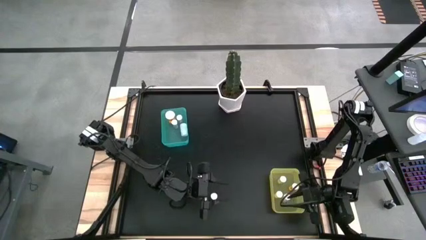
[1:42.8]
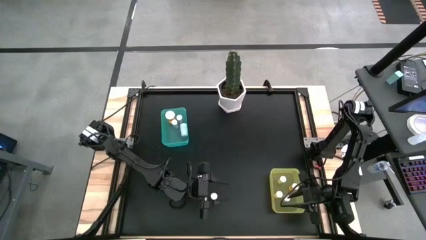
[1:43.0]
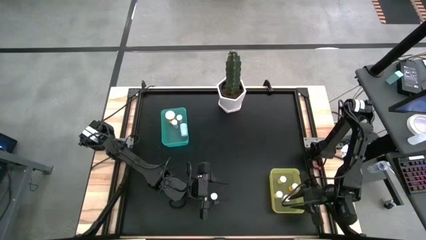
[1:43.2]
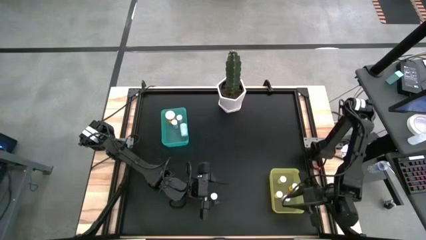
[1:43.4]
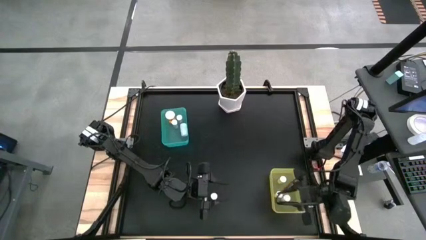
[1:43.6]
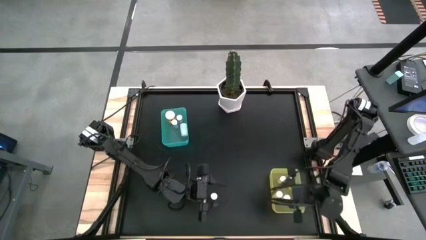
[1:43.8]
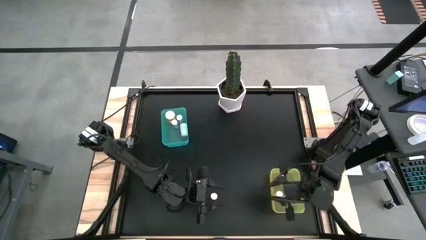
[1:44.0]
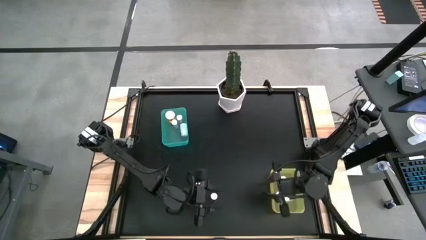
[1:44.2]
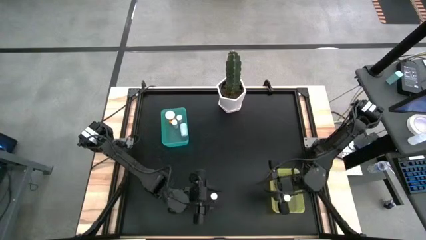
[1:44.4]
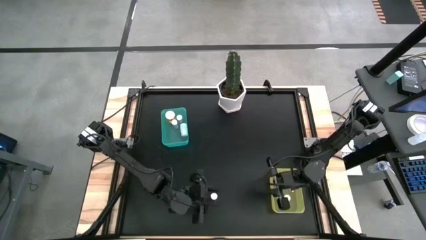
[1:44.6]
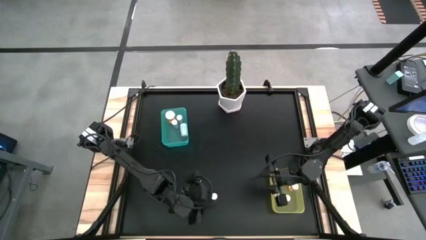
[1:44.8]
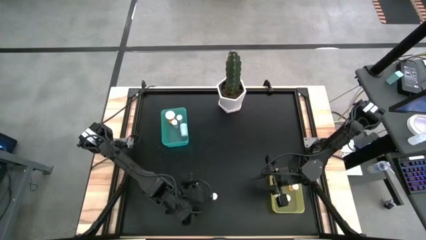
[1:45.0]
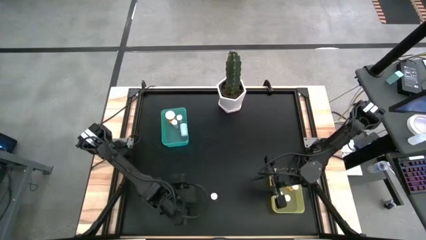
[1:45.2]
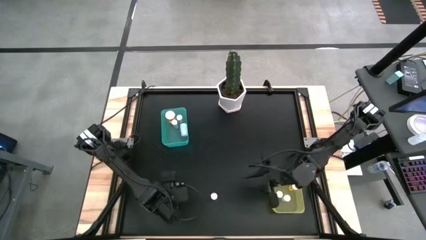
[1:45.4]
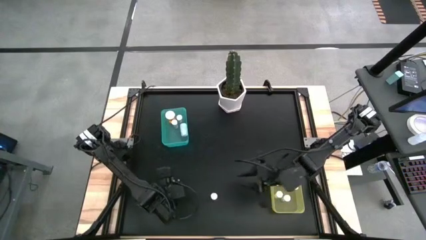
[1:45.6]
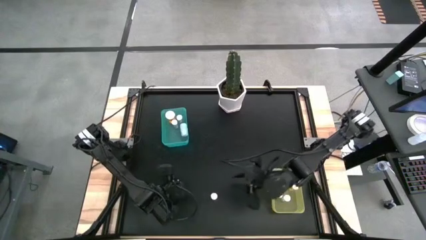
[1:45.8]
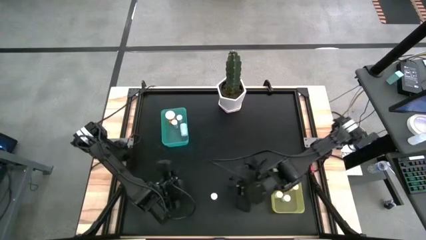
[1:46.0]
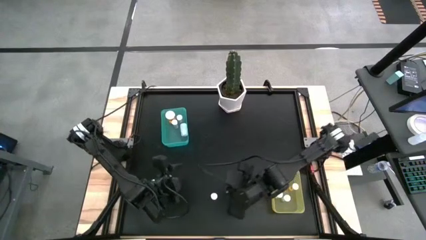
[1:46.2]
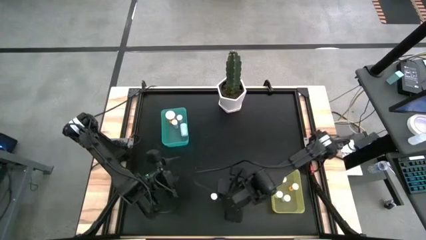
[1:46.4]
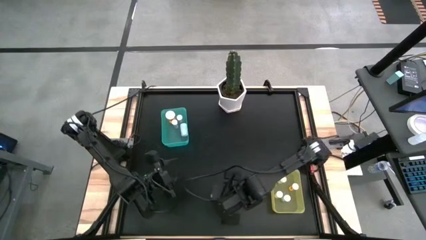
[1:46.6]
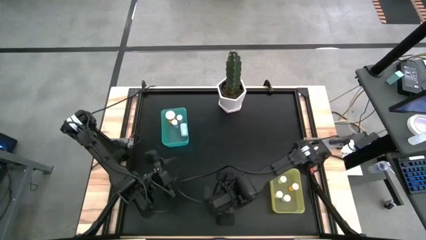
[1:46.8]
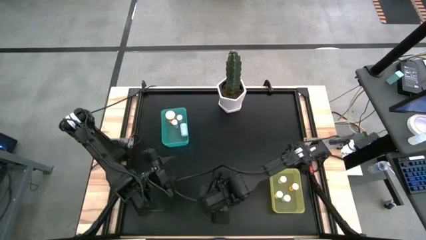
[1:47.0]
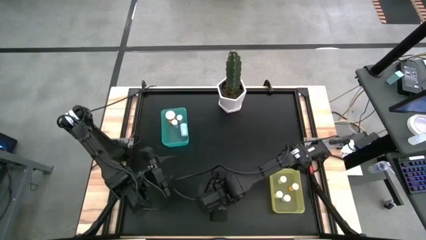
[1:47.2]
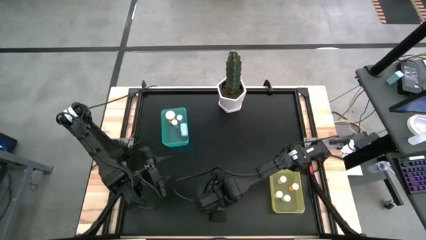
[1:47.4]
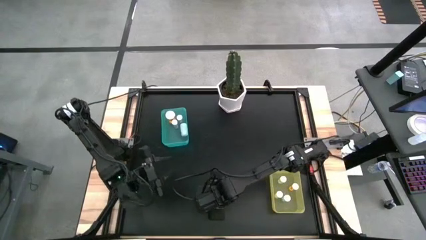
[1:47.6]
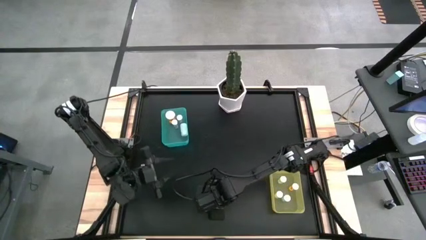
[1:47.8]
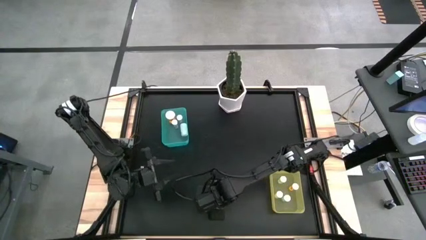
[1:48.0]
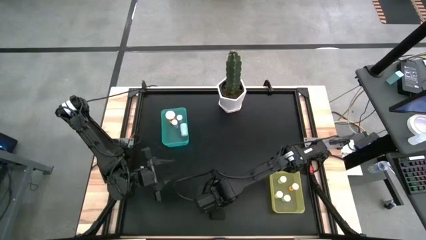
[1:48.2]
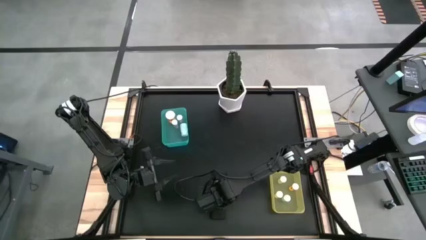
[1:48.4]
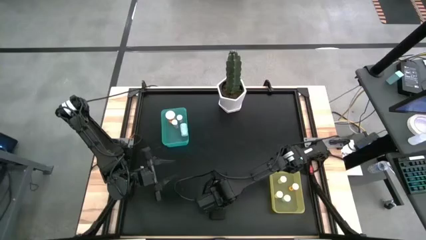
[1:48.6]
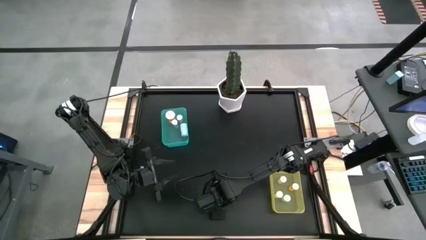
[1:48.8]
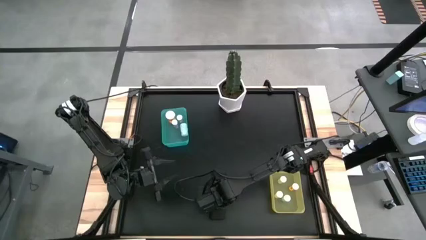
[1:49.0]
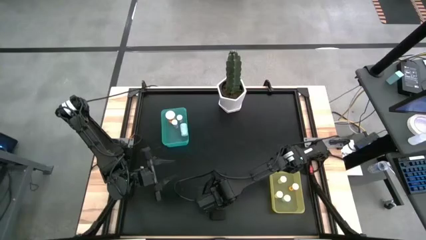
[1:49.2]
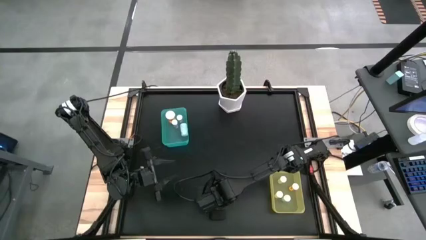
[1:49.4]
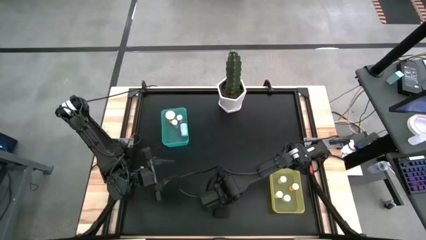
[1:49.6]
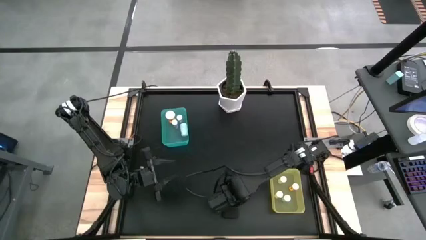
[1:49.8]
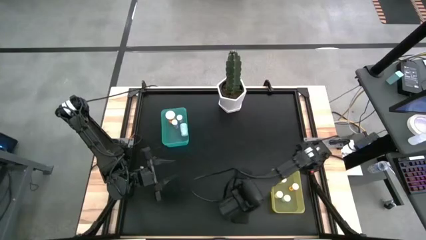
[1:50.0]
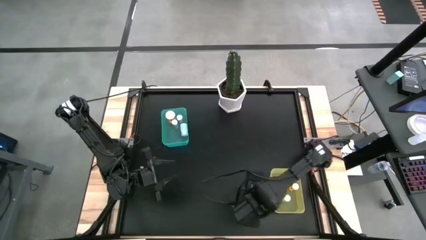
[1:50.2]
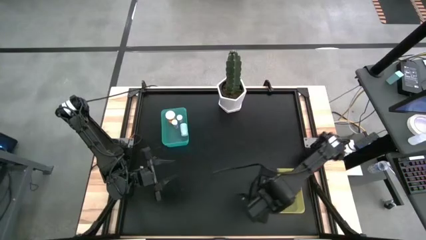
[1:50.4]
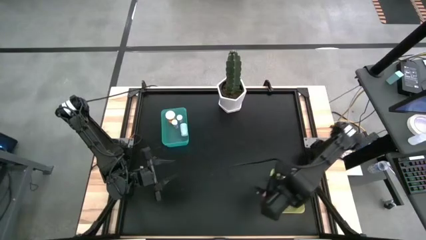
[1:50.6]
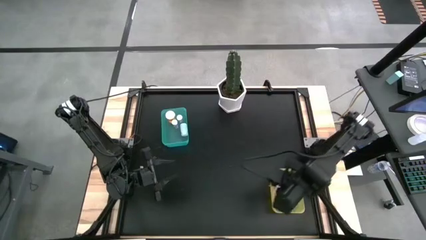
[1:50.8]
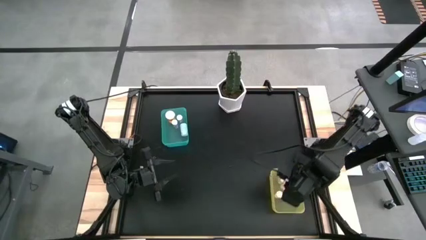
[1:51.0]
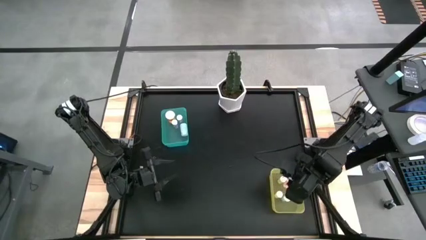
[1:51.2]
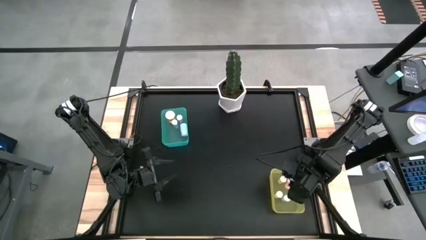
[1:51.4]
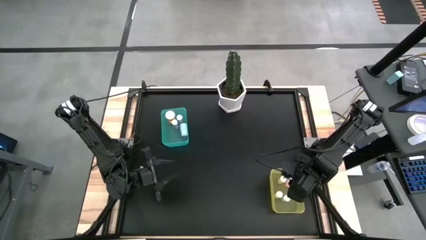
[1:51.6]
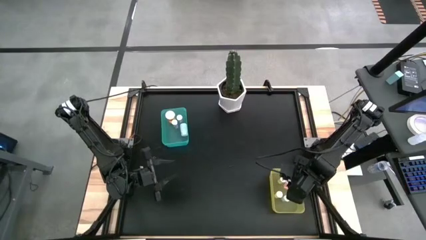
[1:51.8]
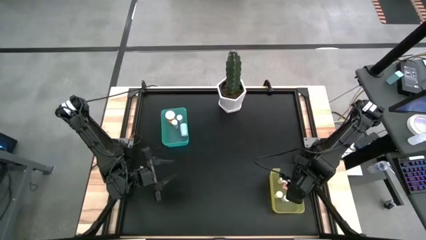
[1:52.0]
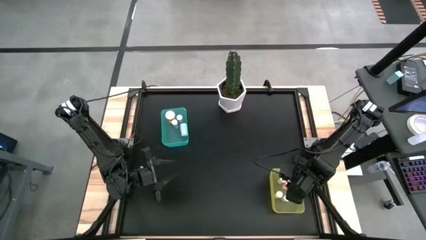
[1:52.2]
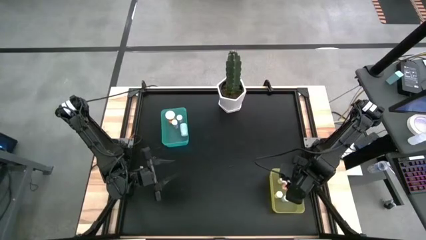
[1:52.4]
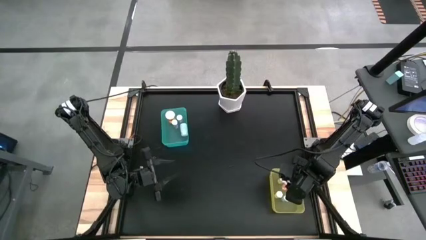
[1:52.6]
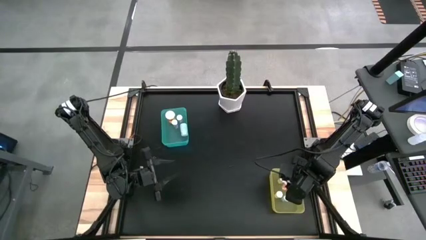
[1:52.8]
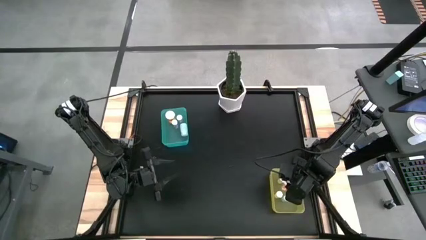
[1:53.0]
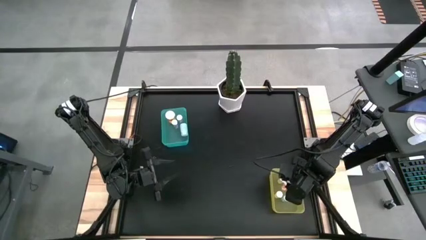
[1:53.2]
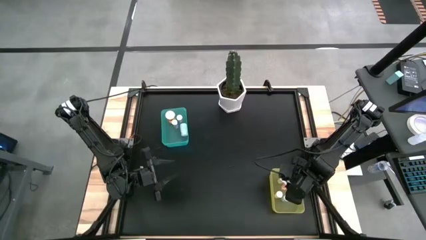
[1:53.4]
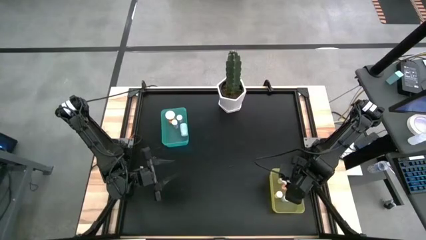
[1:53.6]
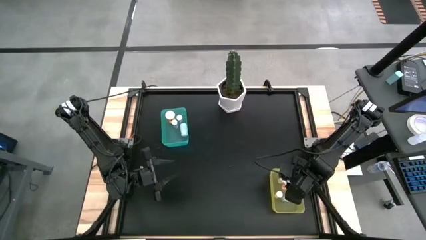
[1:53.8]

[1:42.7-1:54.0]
Task: Pick and place medicine bottles into bin by pill shape (circle, oval)
Put the pink tablet bottle into the yellow bin

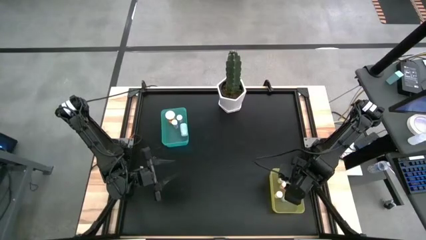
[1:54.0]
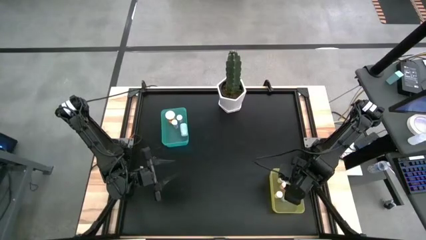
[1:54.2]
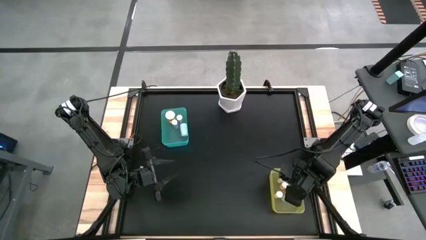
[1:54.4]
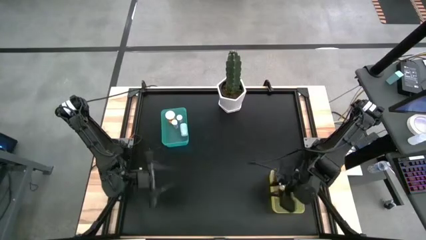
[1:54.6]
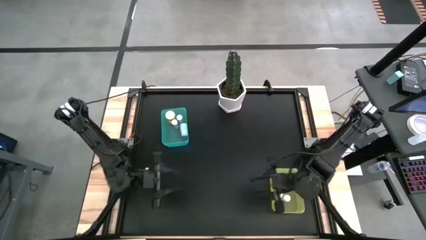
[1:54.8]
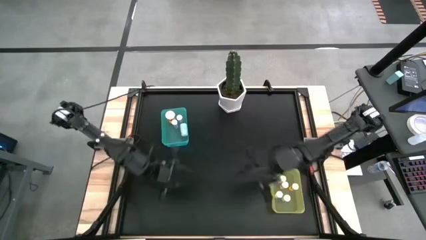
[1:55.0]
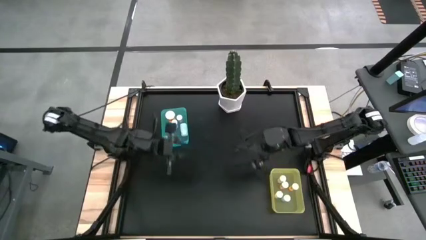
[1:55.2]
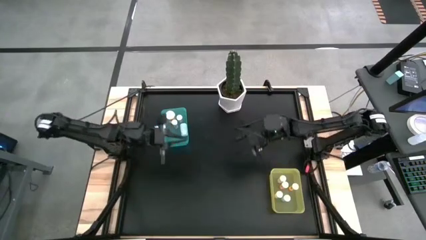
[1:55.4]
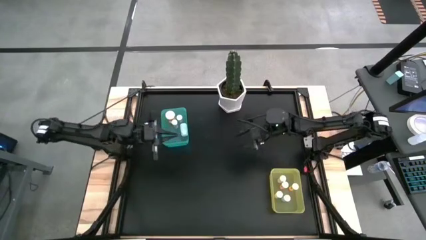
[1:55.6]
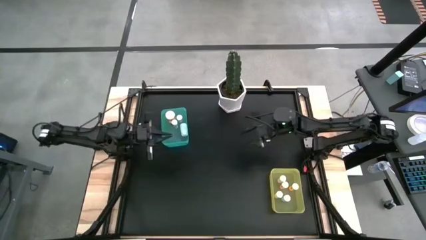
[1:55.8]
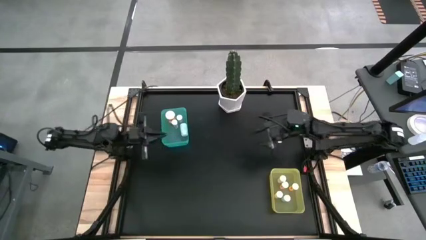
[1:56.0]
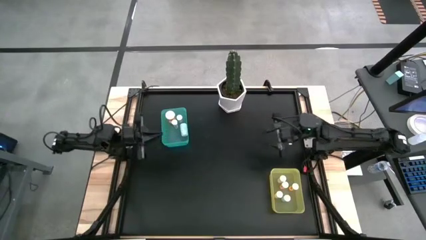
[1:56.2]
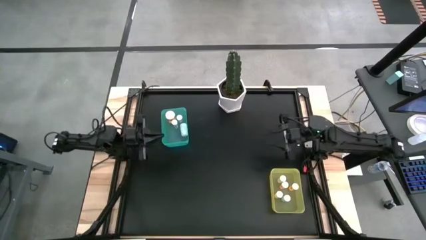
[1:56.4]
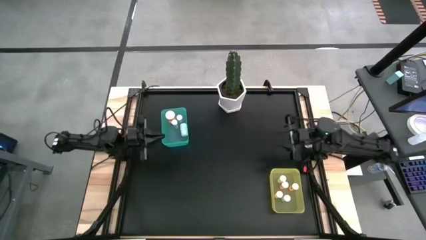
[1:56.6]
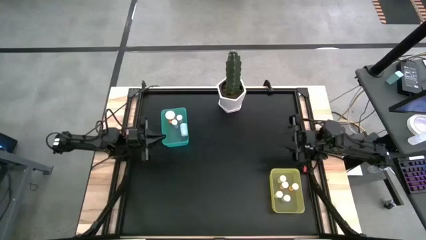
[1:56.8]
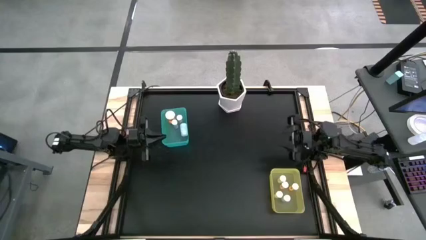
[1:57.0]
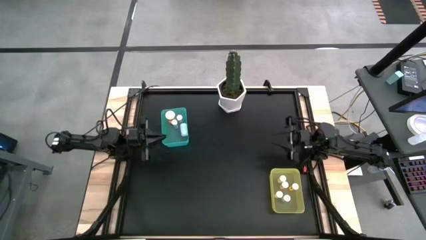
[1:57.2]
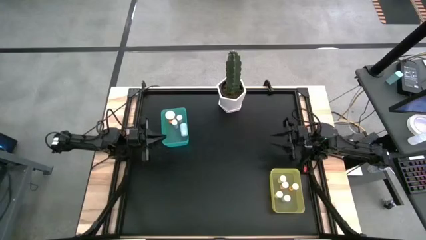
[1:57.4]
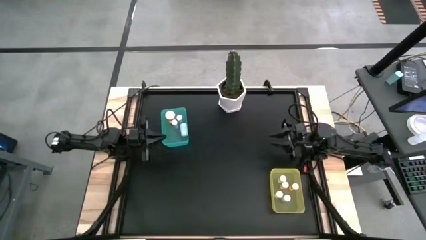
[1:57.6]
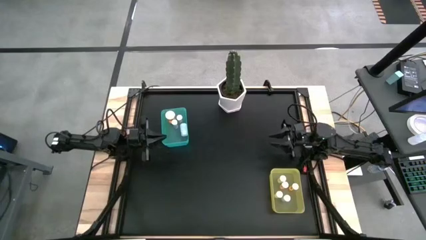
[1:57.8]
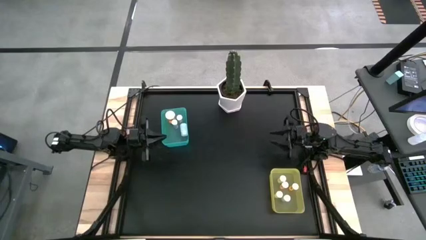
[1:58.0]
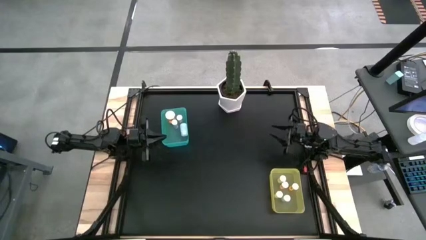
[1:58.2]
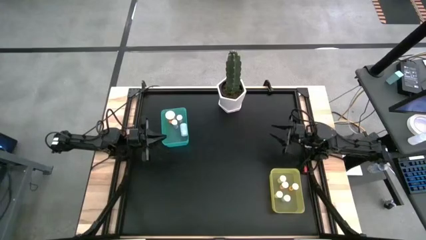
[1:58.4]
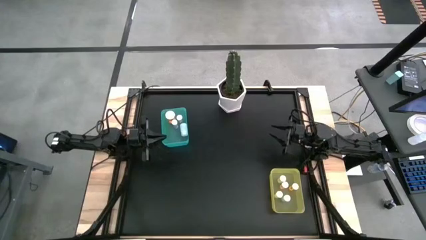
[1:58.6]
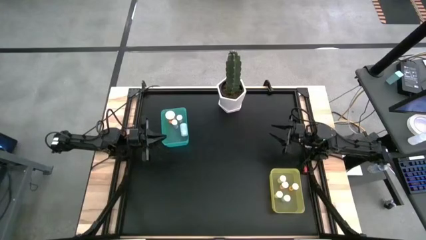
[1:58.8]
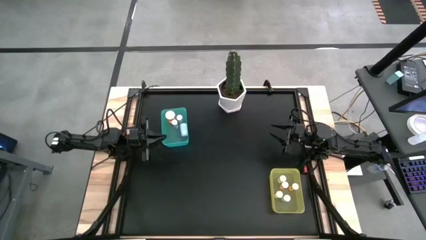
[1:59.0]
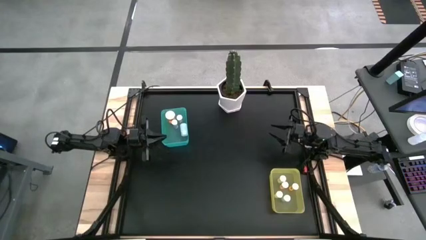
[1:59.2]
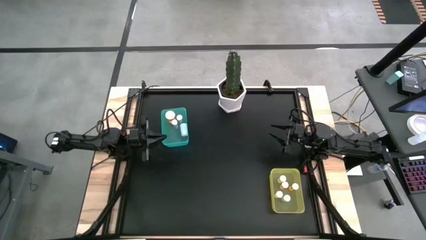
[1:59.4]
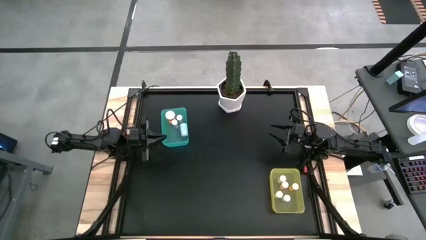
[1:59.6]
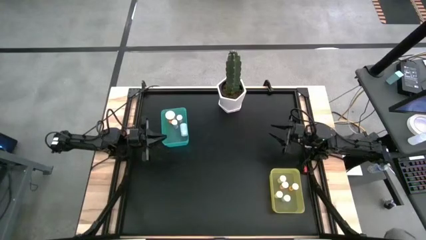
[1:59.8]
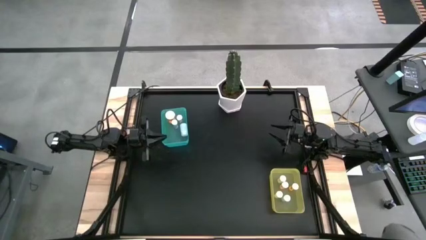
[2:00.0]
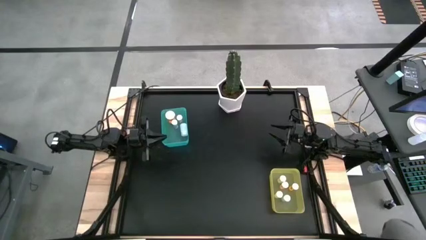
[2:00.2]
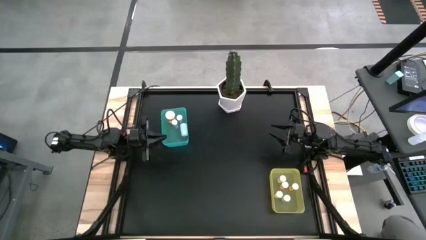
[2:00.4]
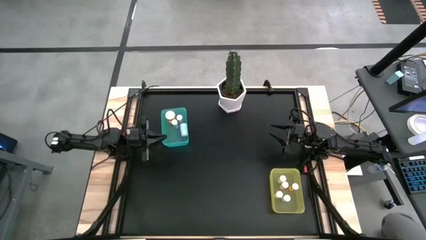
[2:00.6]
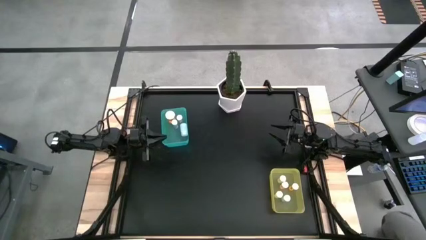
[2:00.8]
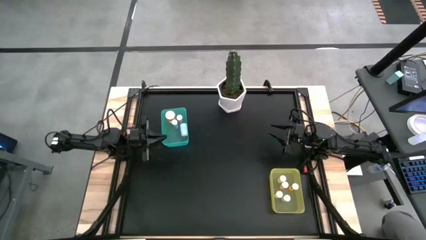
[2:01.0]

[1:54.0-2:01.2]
Return to Home Position
